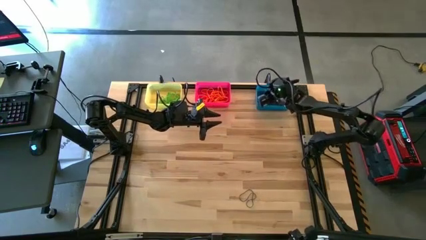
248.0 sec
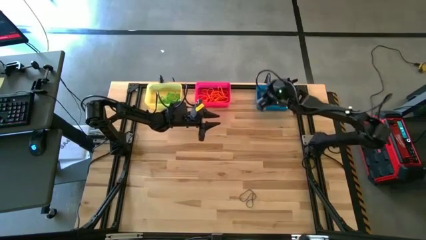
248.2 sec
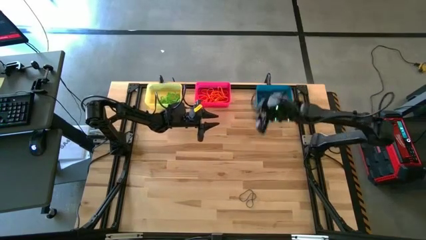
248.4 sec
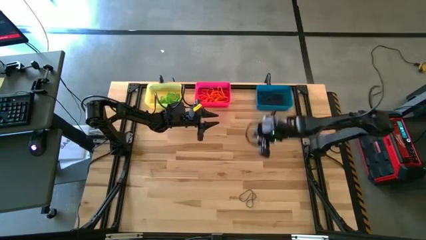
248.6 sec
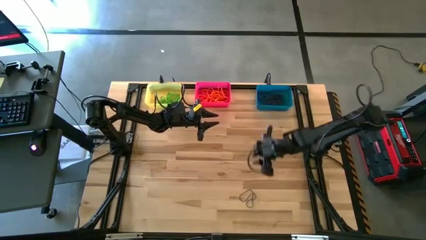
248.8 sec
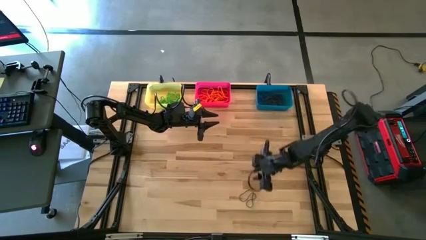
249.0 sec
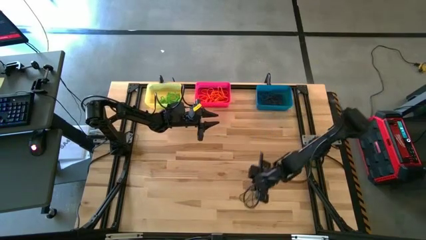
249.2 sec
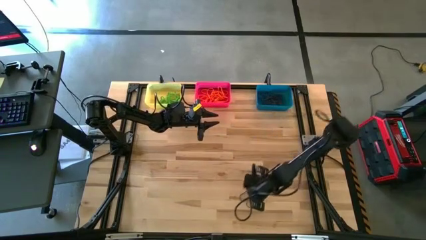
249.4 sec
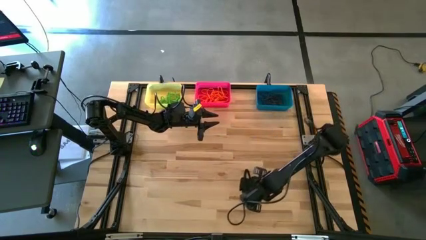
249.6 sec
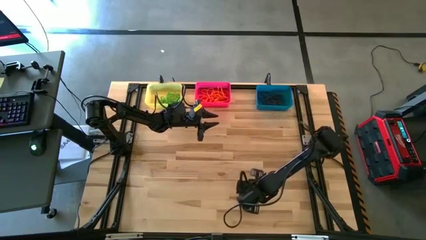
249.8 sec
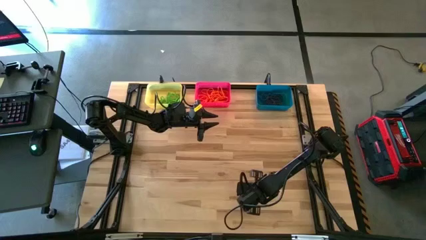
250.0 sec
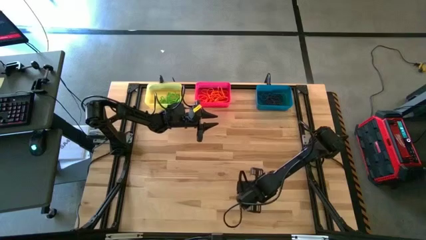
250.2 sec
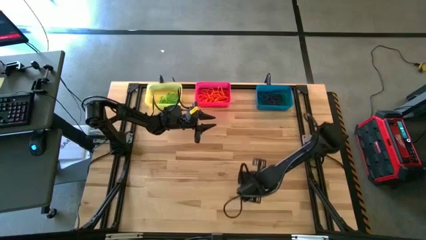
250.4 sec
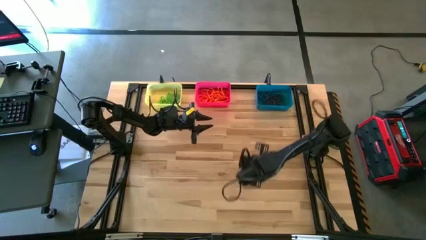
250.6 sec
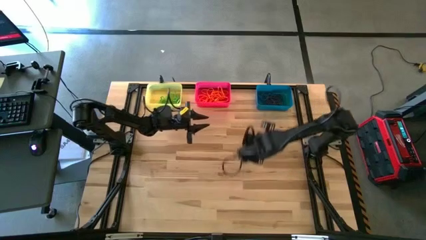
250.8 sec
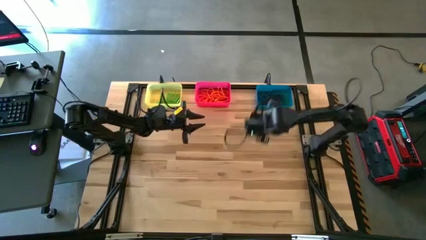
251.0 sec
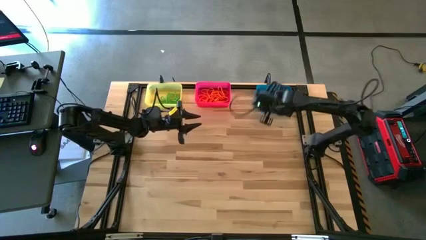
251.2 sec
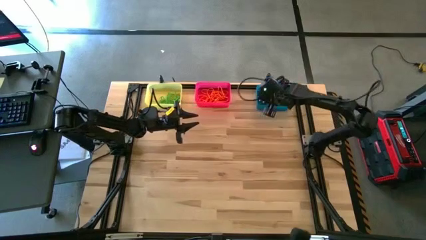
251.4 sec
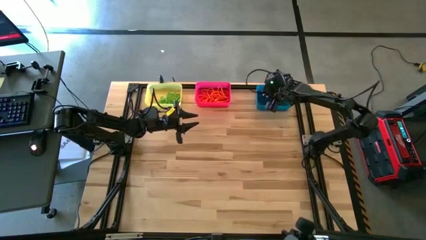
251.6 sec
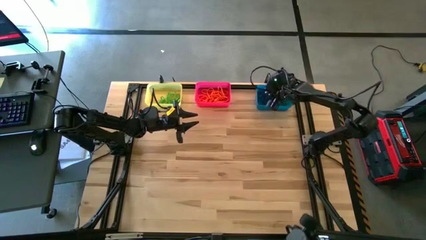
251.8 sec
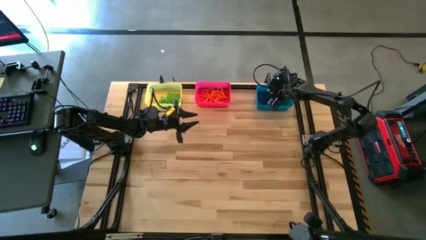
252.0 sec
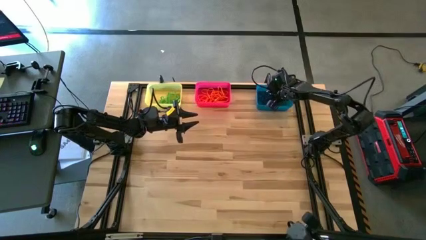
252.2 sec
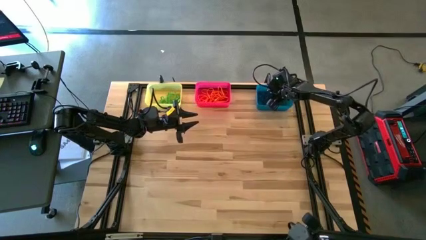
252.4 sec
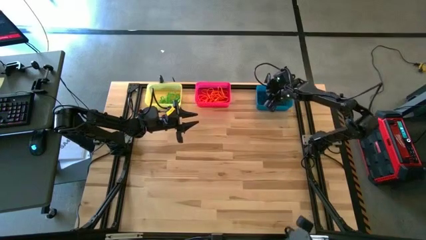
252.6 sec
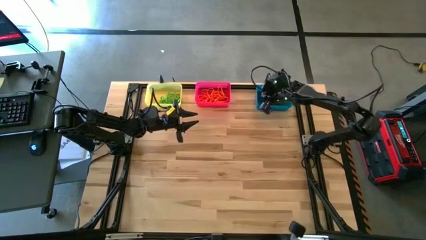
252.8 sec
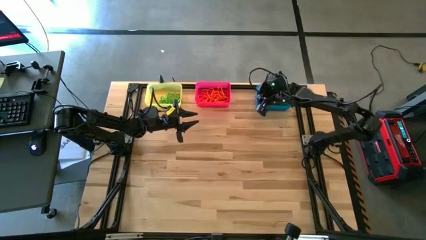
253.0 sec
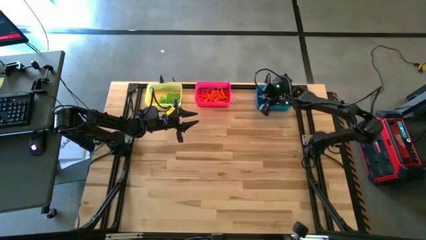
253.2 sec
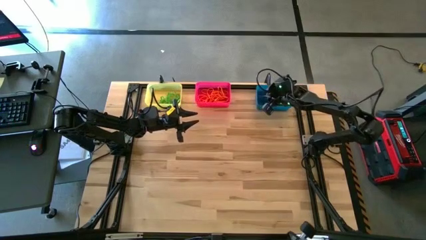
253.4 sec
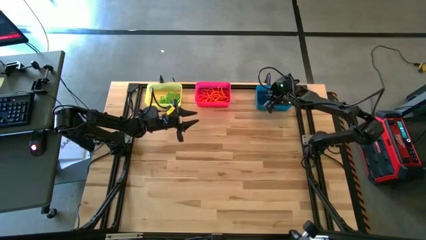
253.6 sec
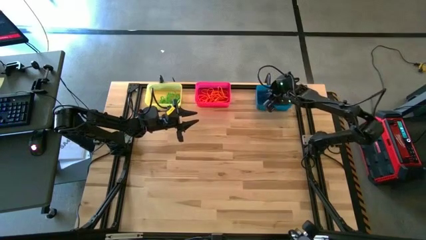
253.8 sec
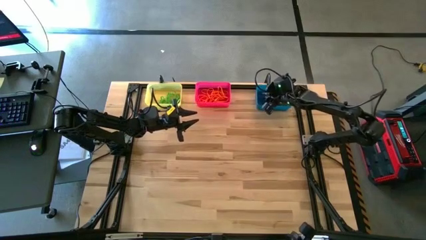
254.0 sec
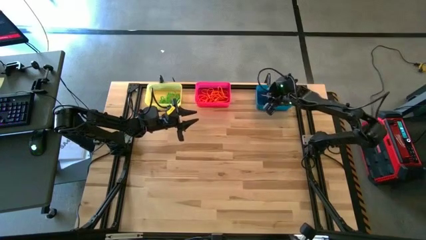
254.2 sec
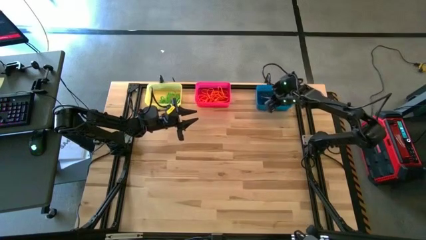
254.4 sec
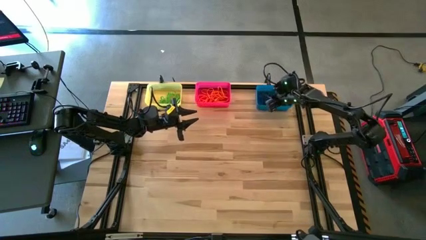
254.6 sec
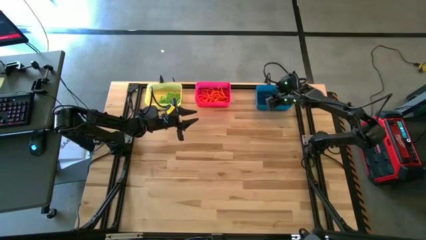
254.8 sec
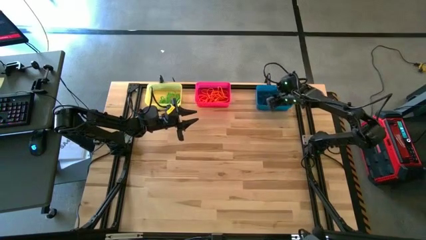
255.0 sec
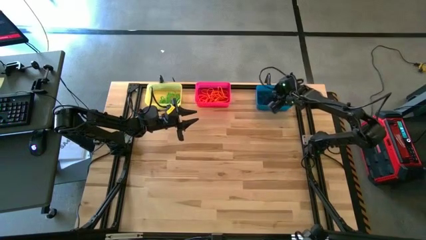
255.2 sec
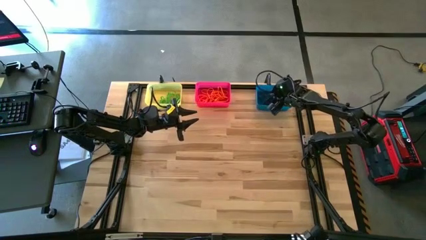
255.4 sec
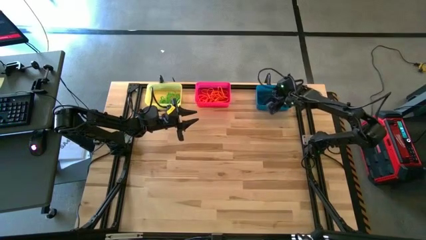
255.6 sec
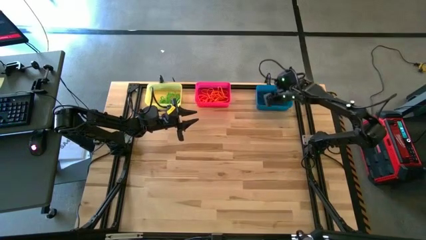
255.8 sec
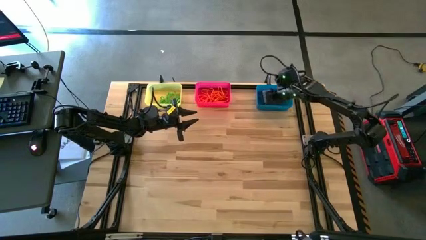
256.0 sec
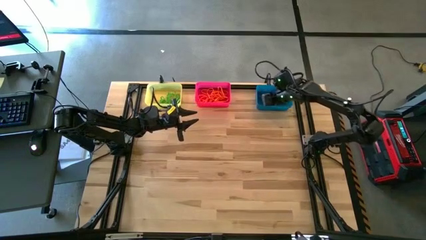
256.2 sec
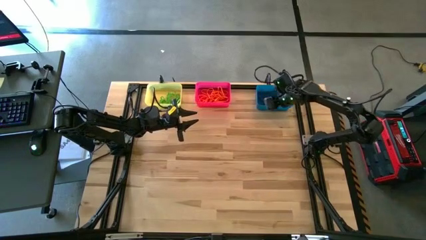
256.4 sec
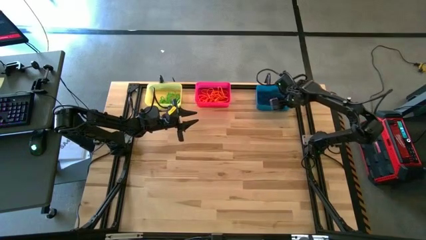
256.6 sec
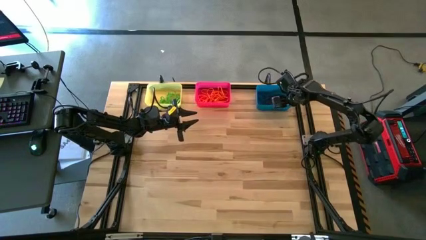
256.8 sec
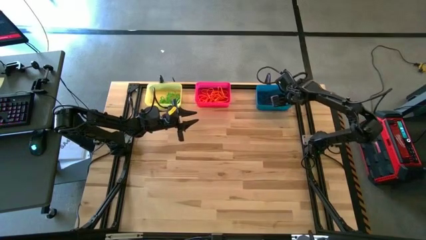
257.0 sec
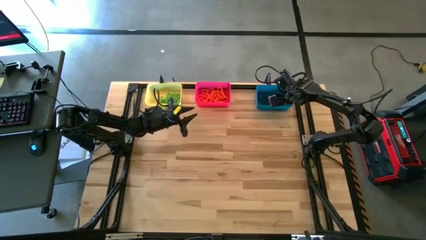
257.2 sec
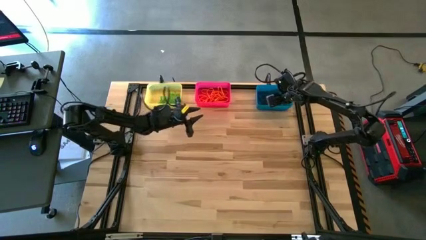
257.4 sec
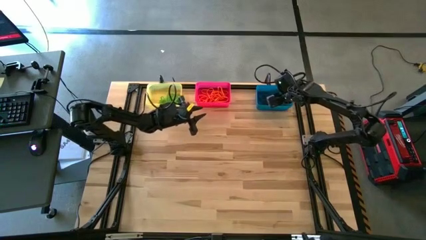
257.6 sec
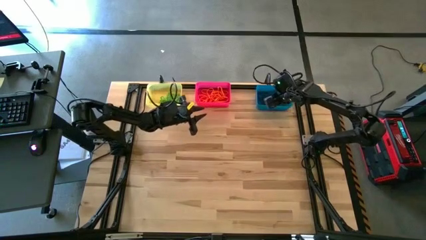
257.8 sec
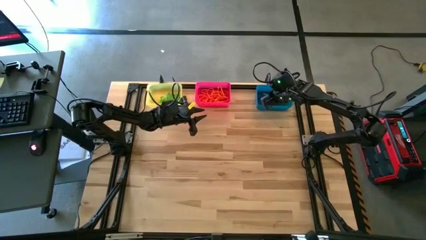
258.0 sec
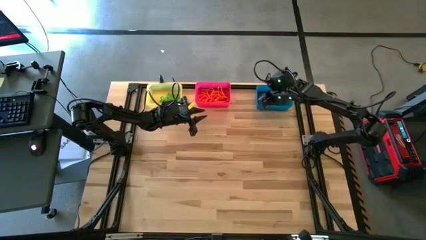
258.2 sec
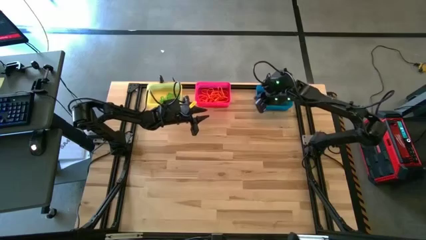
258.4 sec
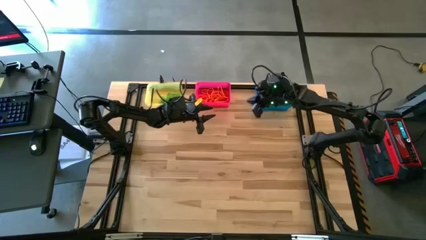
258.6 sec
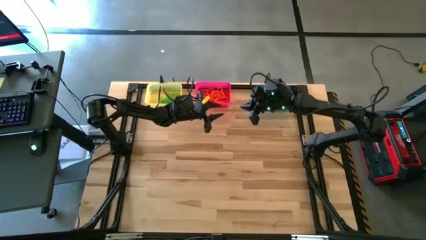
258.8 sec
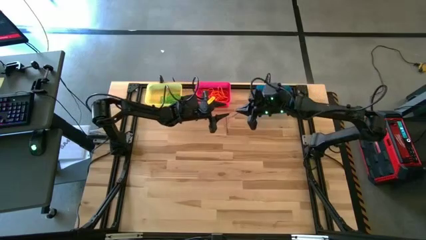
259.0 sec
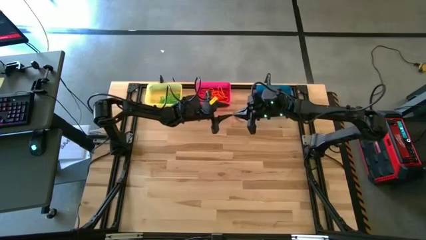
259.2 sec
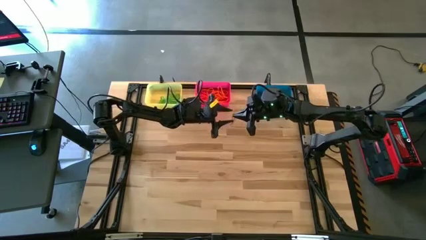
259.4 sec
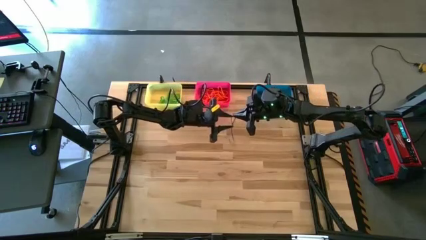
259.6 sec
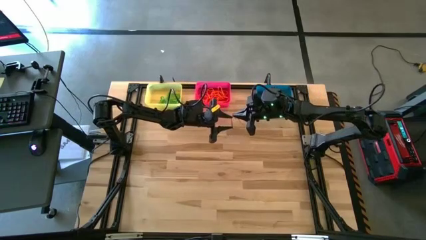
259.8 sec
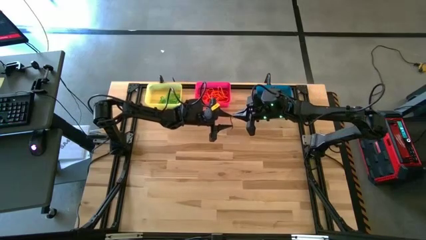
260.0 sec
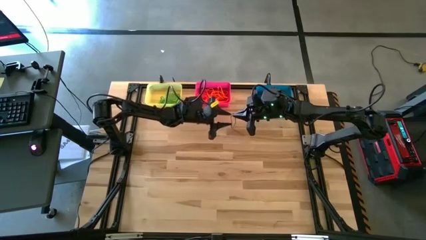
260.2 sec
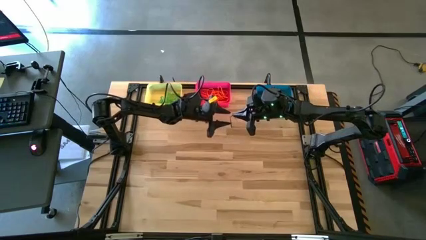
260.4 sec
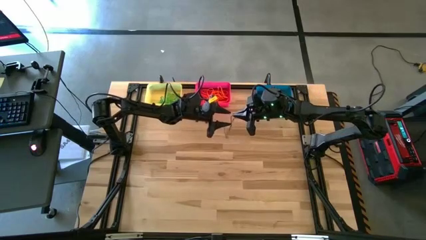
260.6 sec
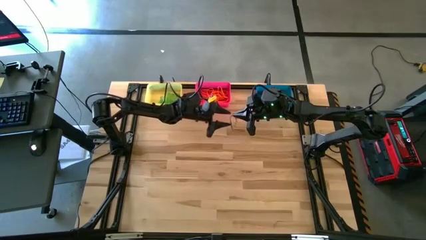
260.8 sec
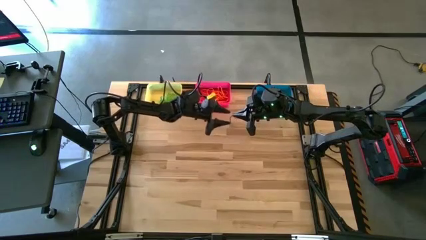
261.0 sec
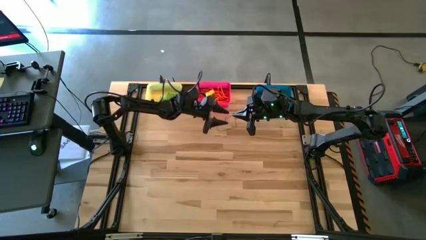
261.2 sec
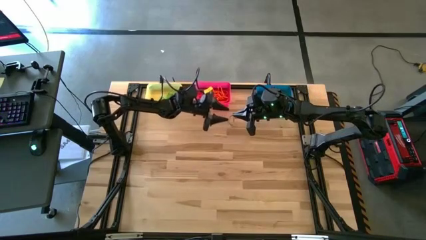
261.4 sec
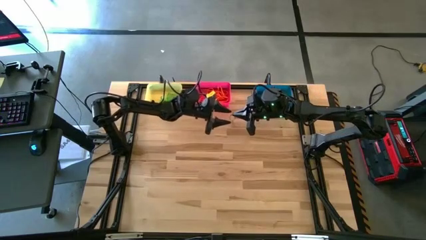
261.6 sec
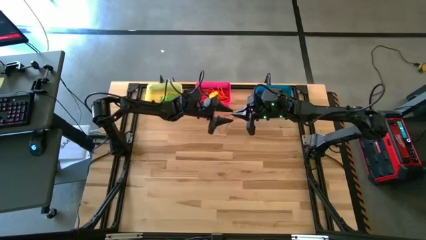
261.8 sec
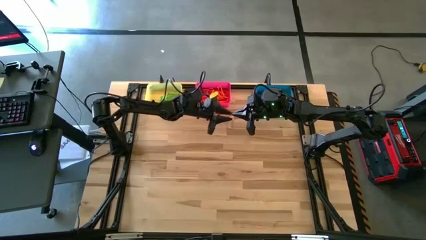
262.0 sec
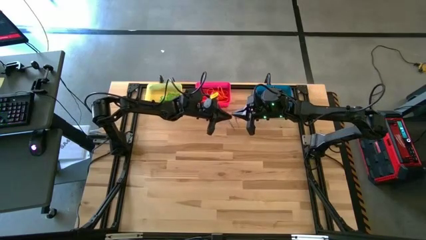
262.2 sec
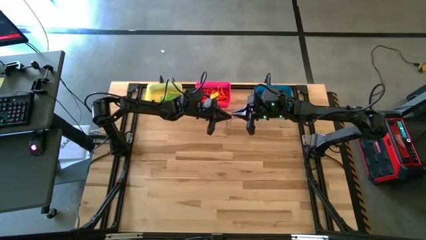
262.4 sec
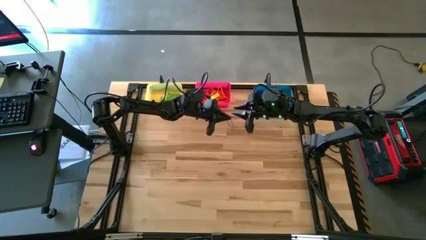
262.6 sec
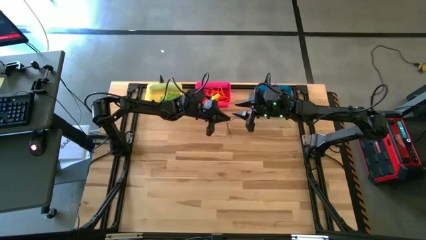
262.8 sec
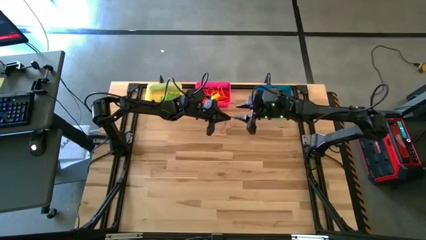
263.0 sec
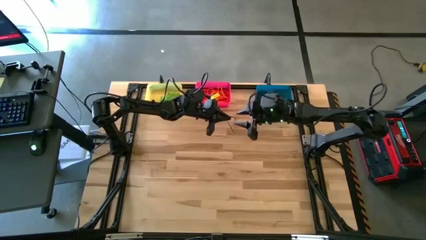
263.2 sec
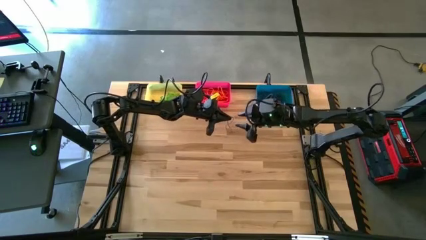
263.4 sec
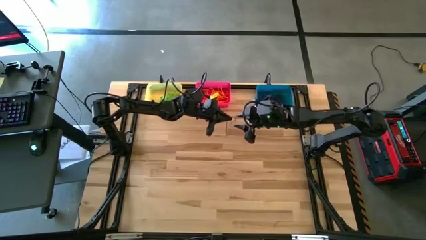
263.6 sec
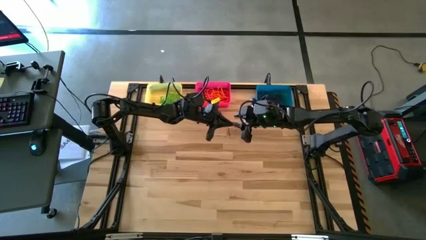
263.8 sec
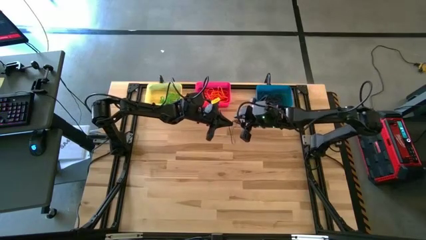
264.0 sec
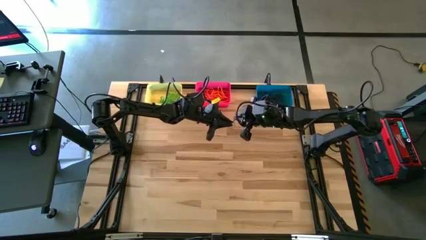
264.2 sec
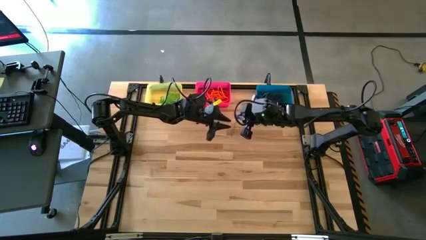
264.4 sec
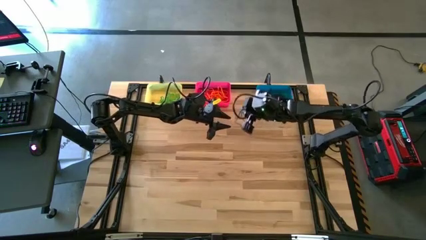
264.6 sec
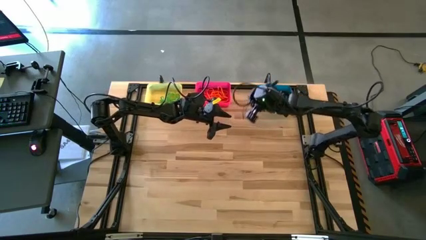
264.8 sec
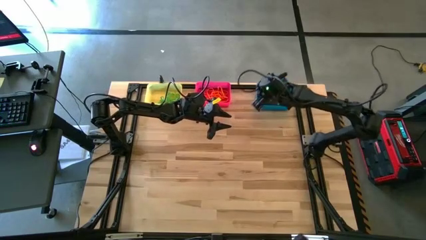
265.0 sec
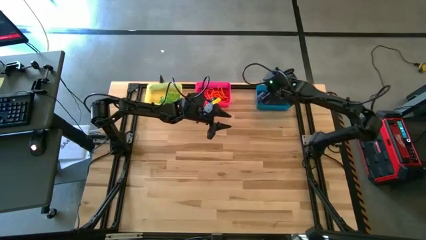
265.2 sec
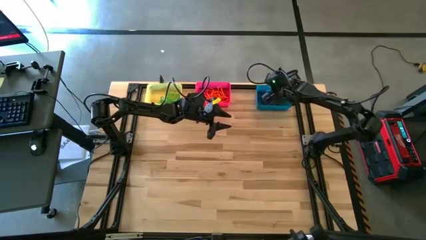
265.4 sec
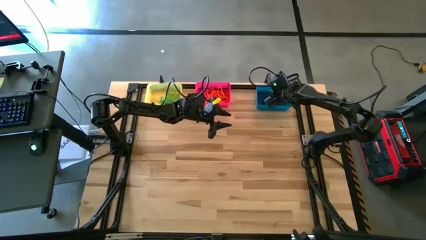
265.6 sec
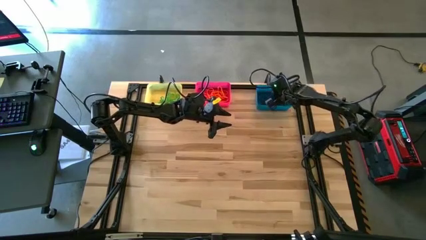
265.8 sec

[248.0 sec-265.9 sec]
Task: Sort rubber bands into baskets
Put the violet rubber band into the blue bin
